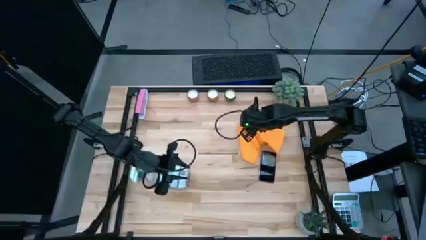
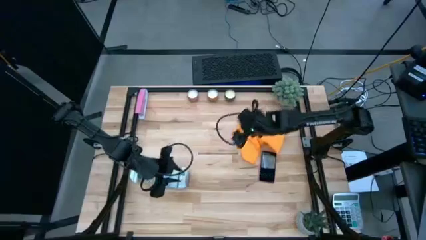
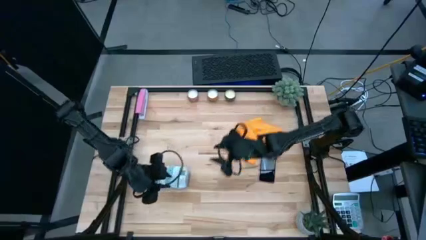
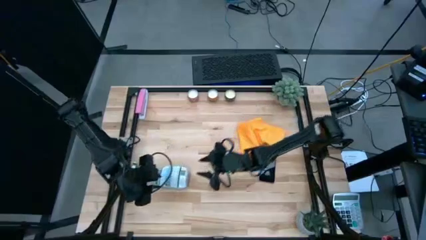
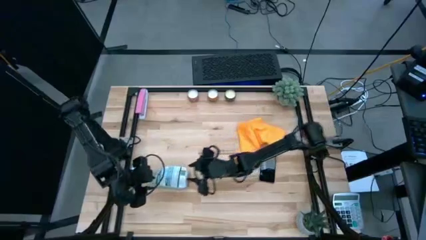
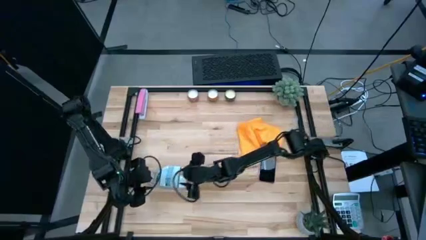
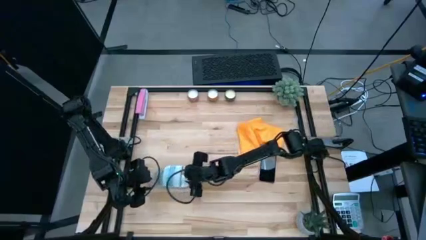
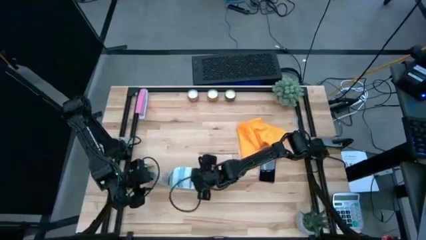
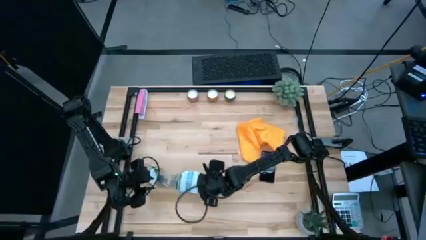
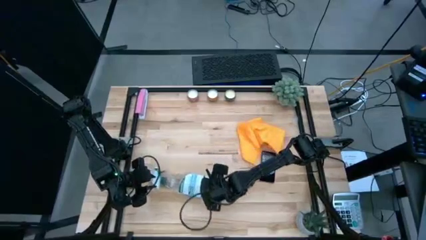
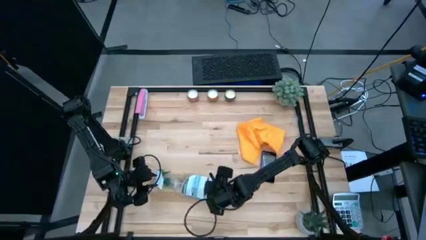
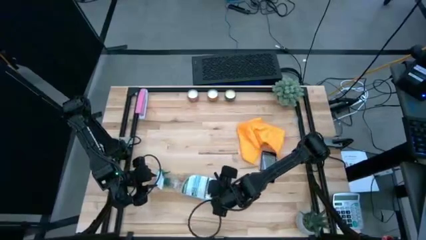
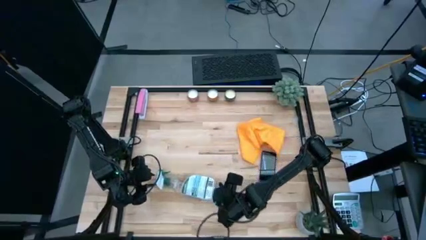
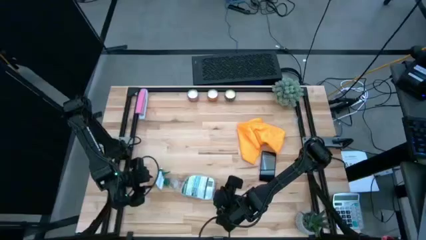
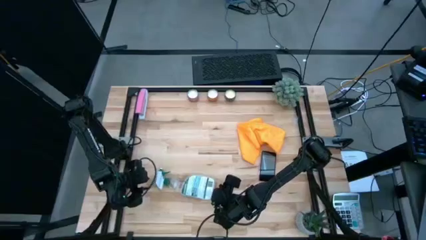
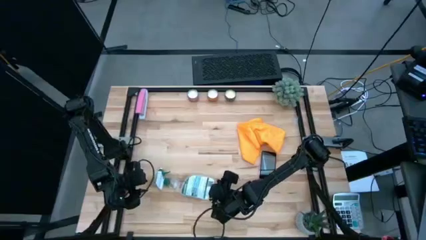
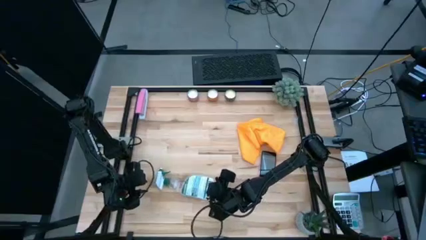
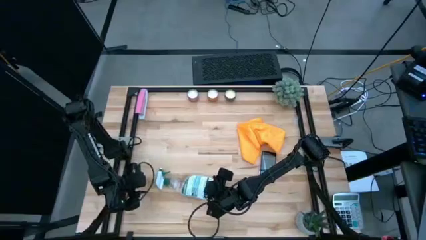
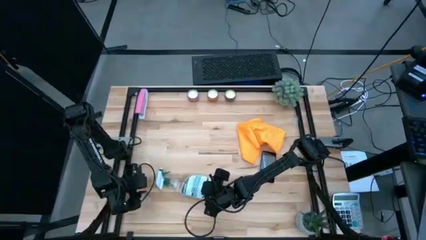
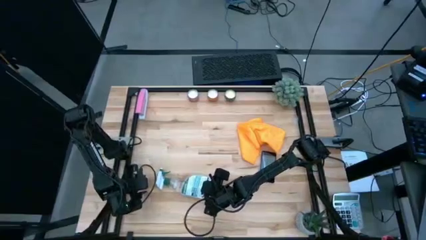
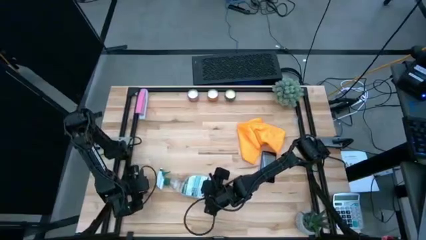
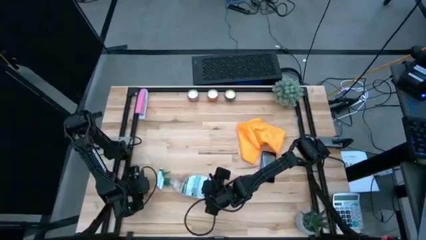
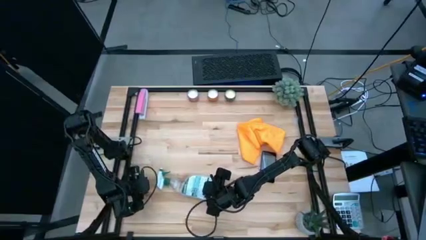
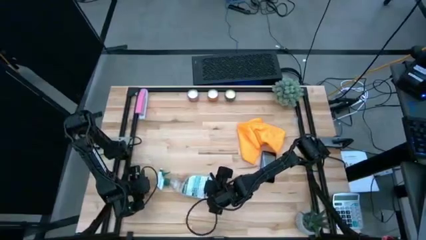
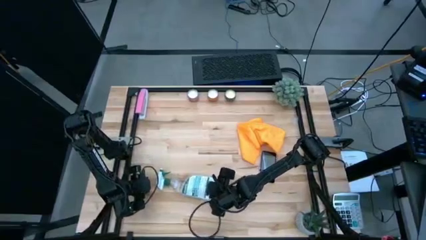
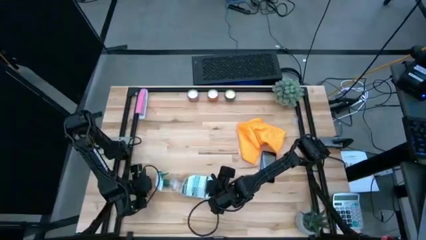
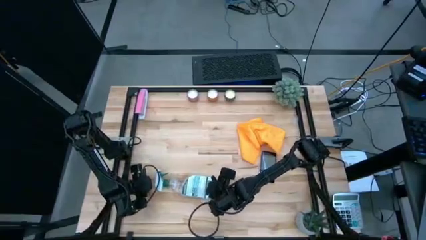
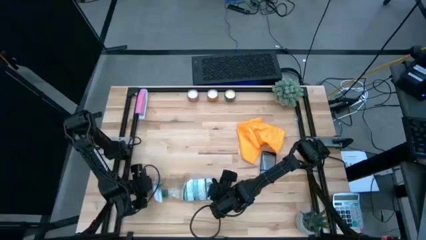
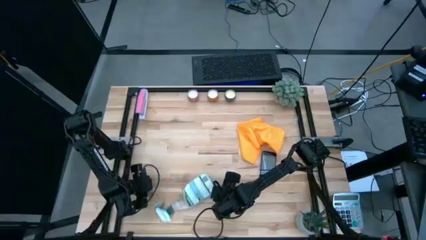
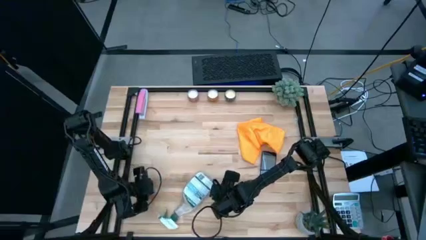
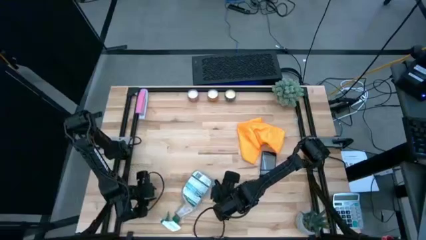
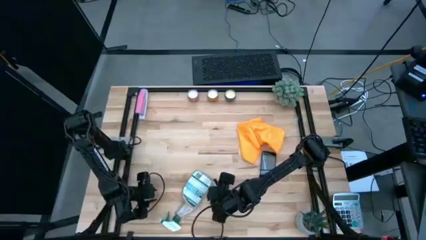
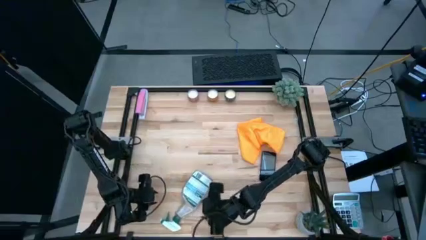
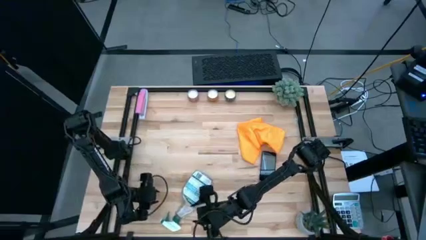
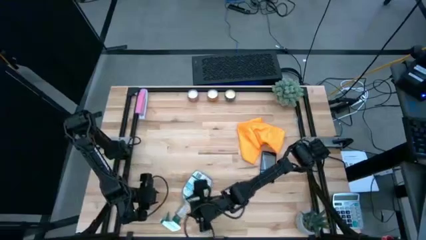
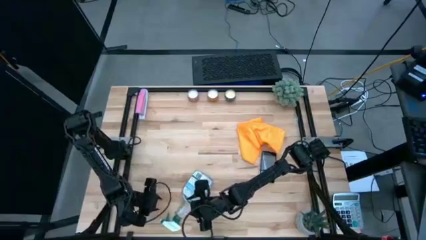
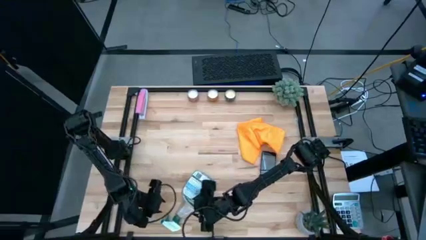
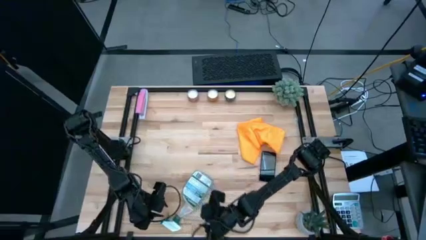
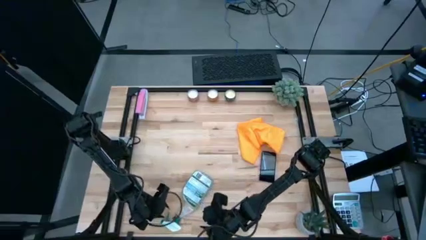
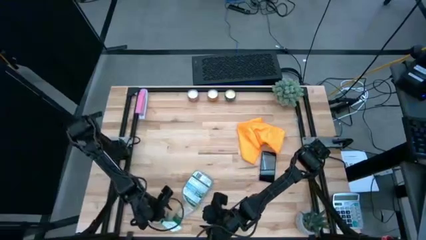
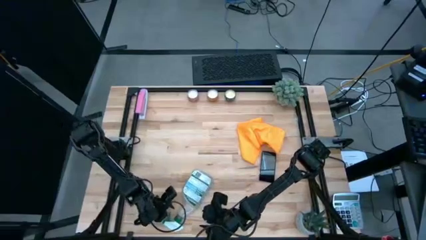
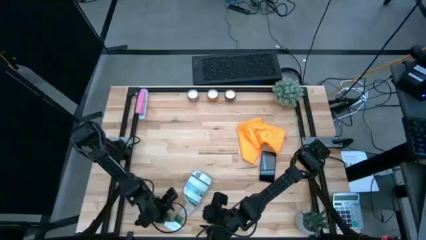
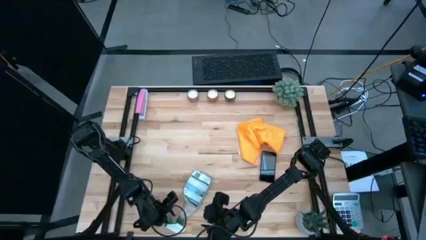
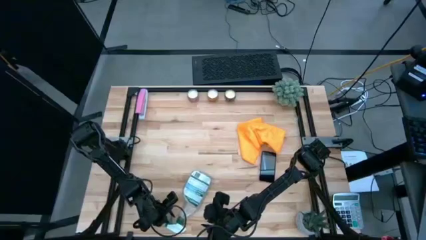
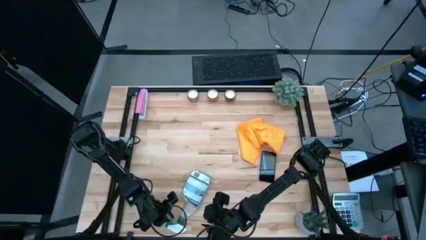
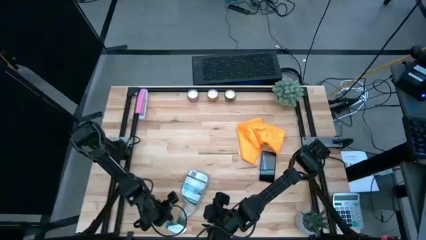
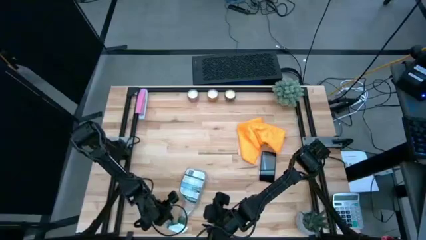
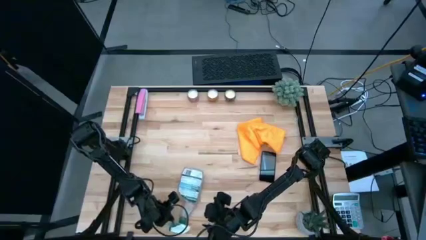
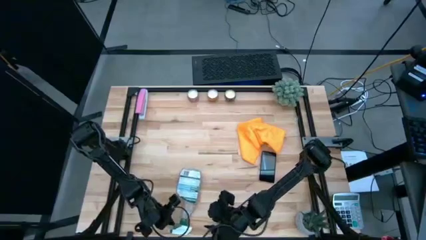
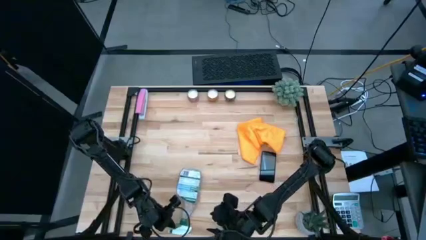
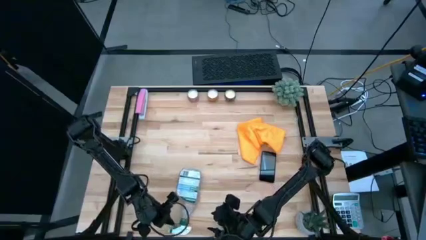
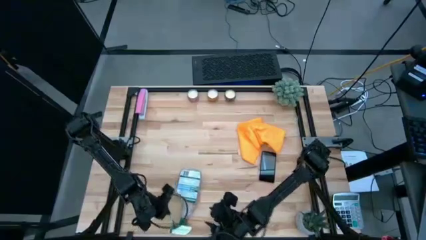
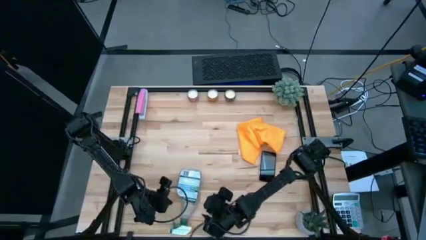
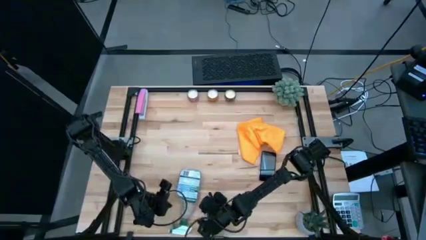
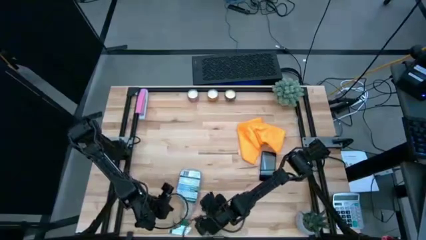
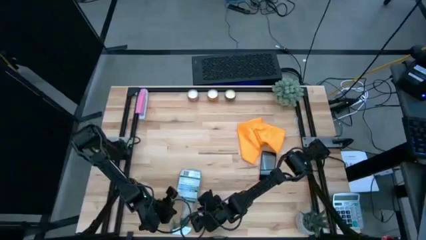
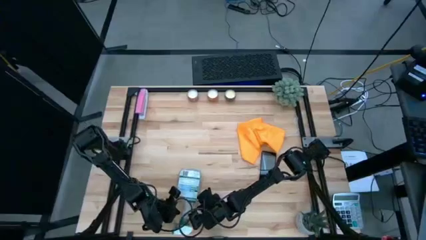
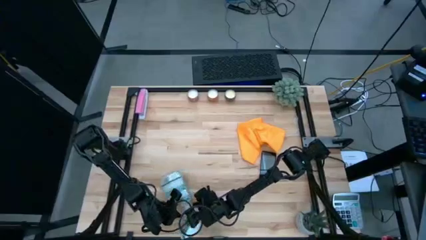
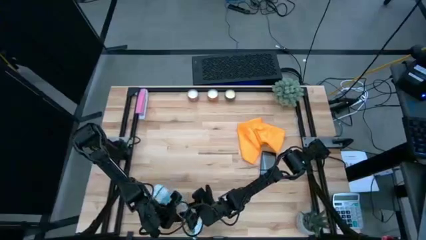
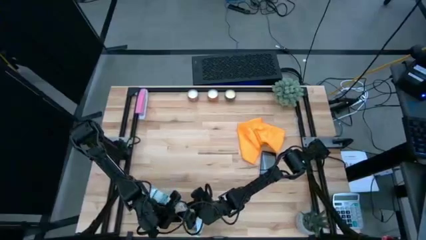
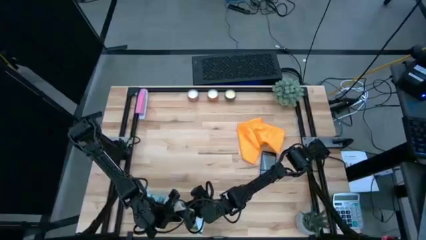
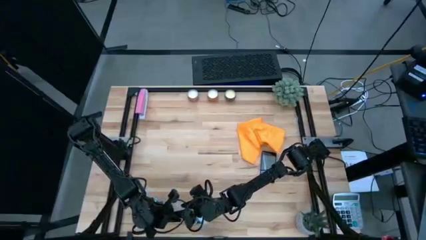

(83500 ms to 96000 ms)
Task: Apply microfiber cloth
Adjust the spray bottle

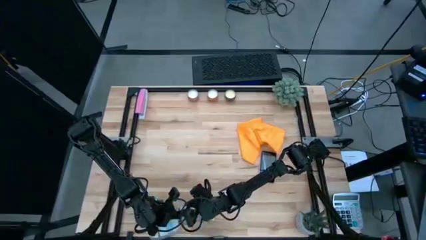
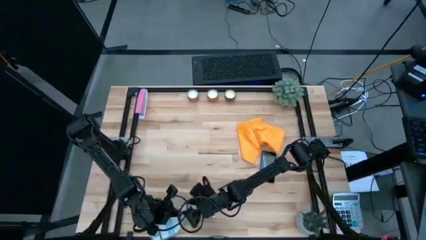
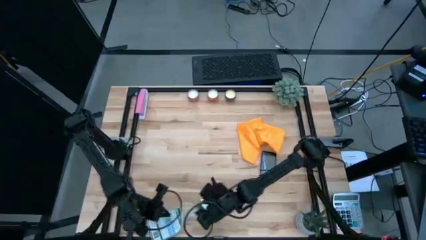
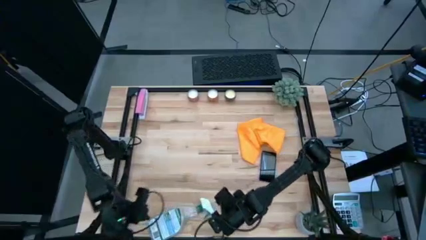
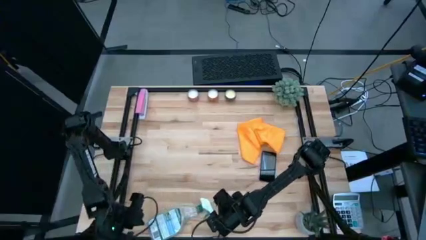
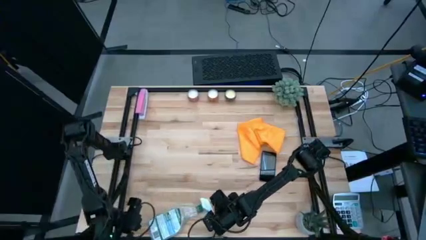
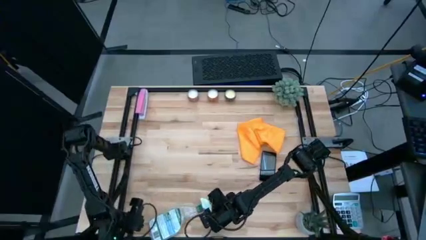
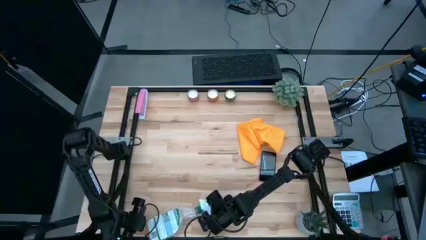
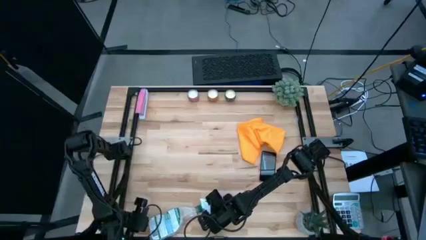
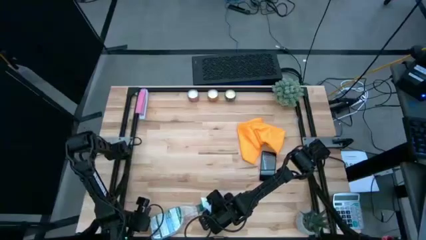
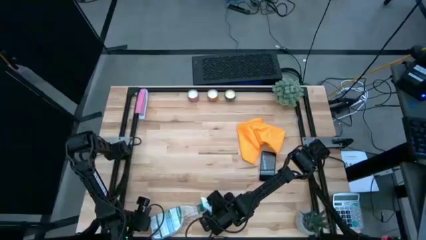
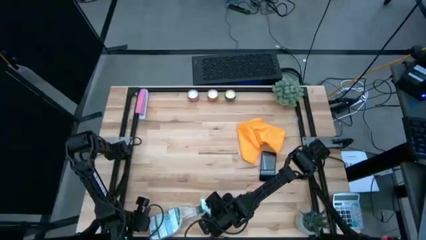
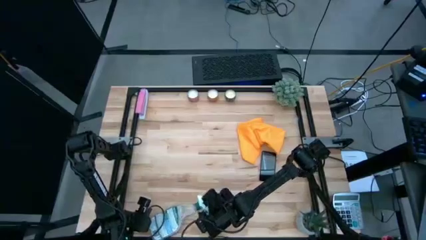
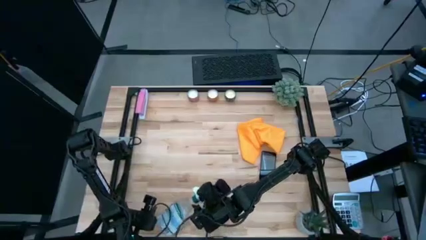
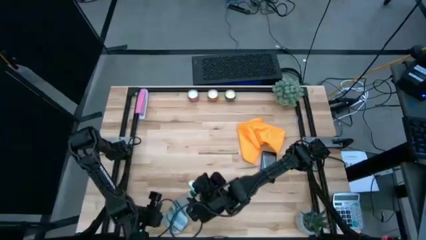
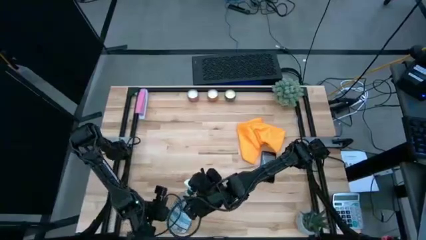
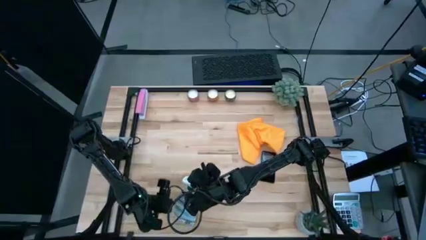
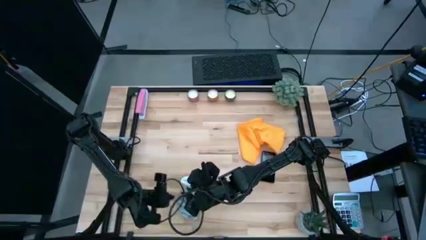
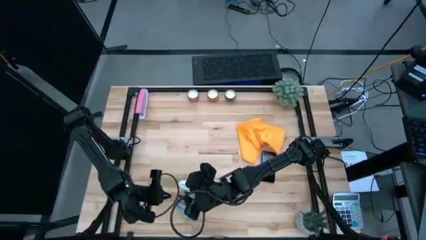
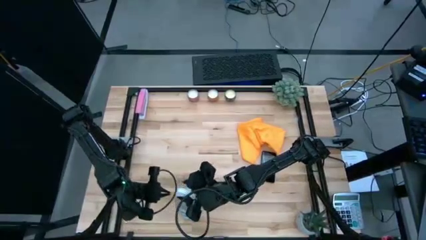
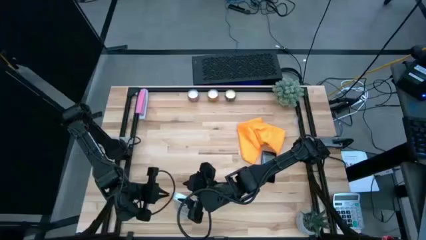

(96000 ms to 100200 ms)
Adjust the spray bottle

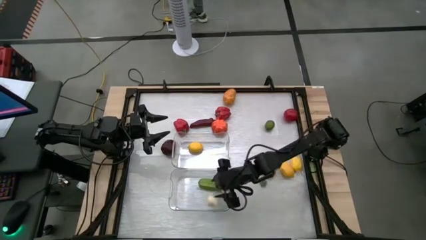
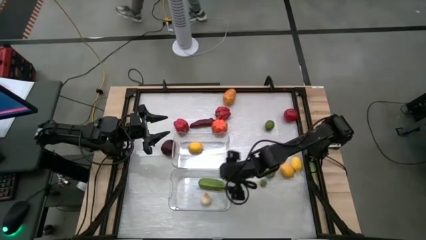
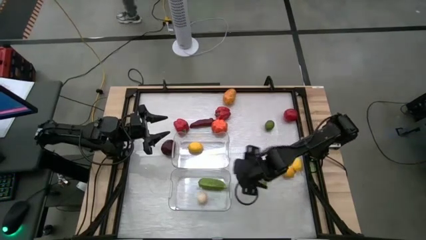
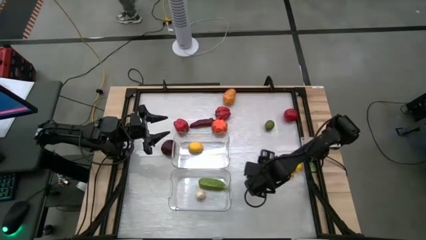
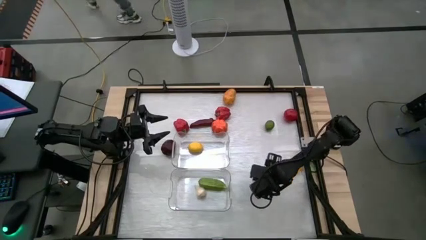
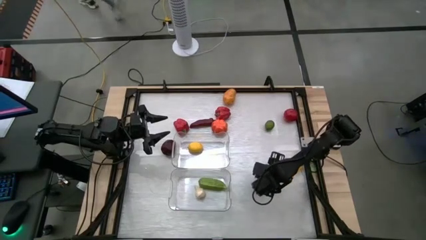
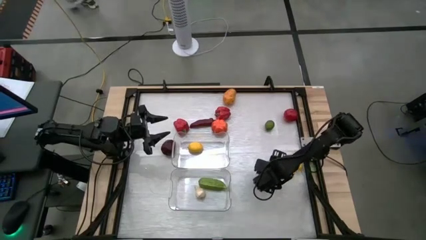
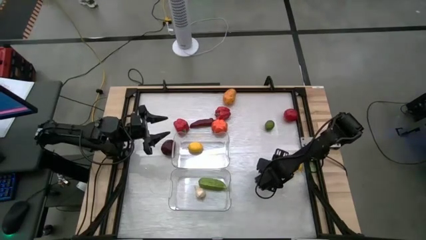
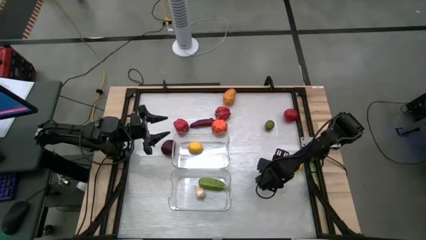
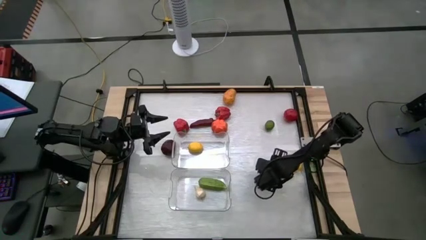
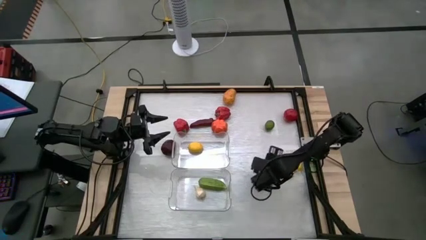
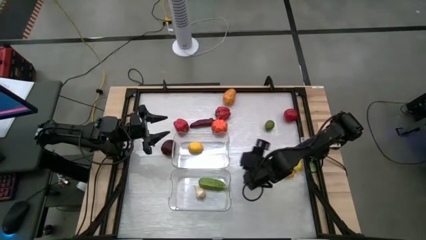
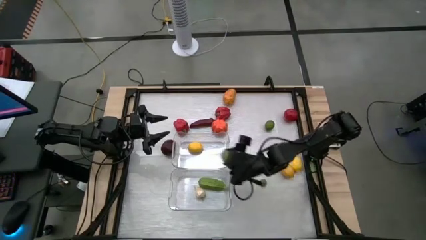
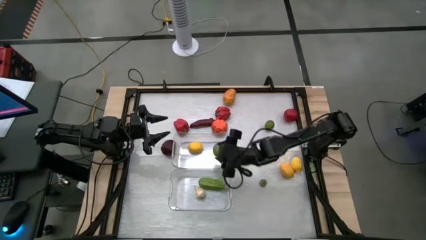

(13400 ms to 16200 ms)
Task: Sort produce into baskets
Put the lime into the top transparent bin
